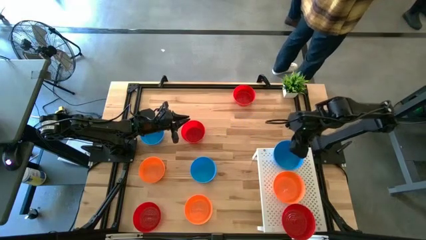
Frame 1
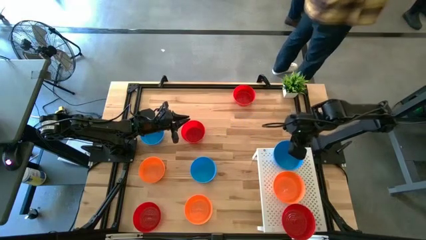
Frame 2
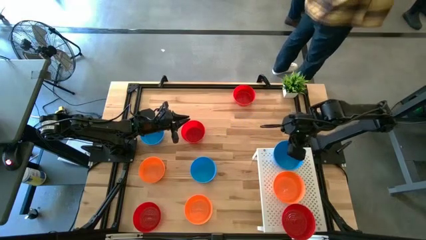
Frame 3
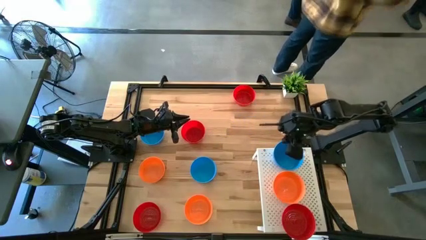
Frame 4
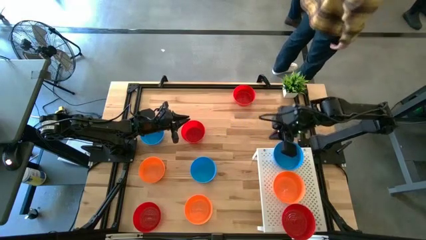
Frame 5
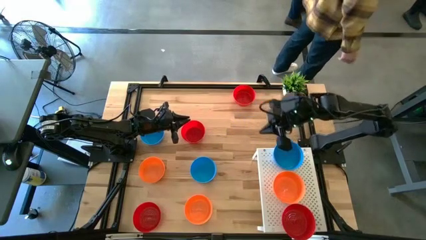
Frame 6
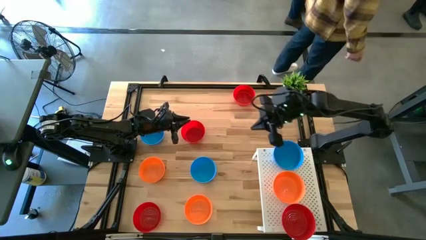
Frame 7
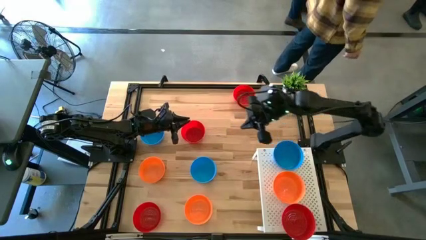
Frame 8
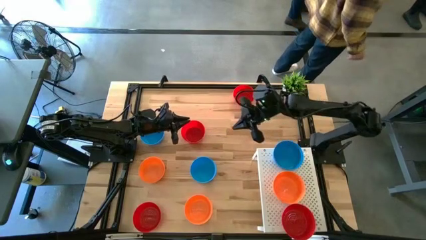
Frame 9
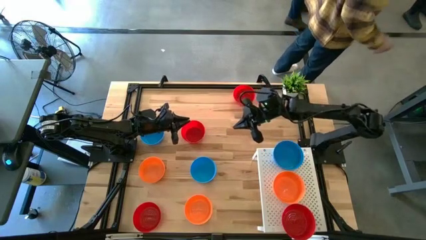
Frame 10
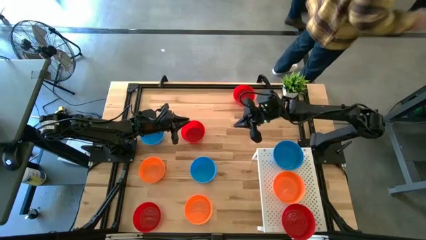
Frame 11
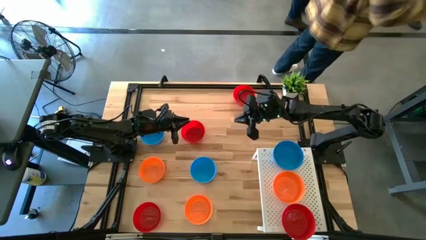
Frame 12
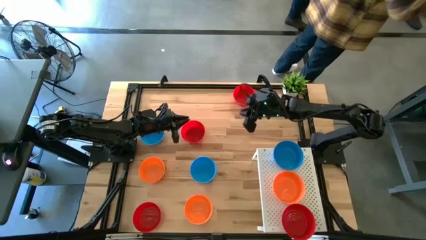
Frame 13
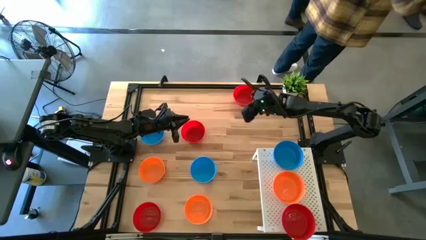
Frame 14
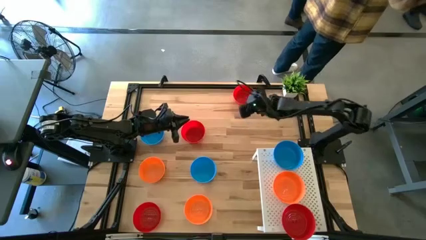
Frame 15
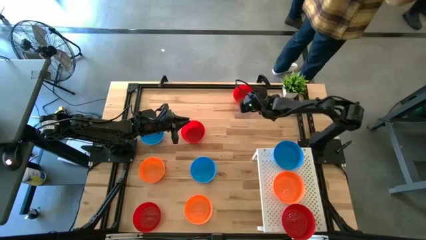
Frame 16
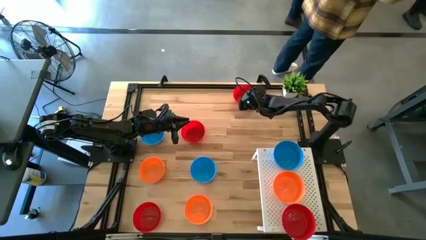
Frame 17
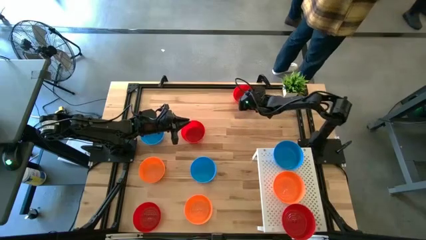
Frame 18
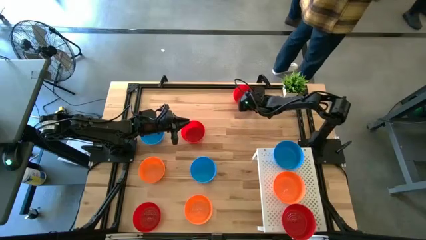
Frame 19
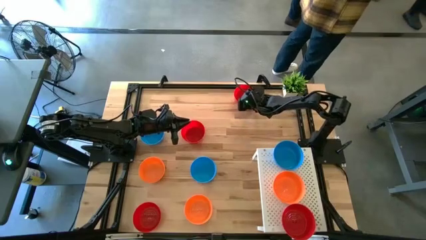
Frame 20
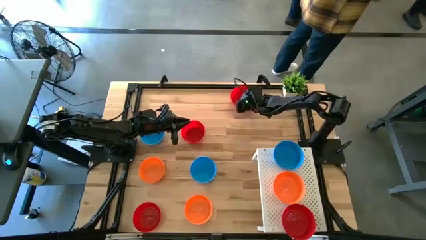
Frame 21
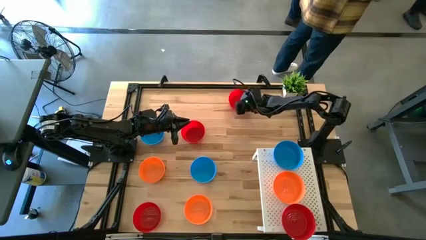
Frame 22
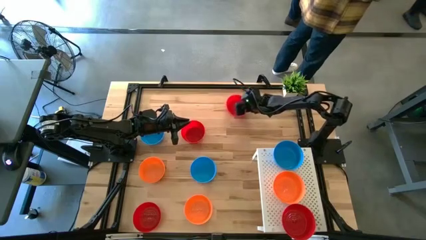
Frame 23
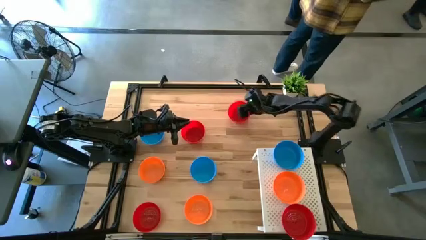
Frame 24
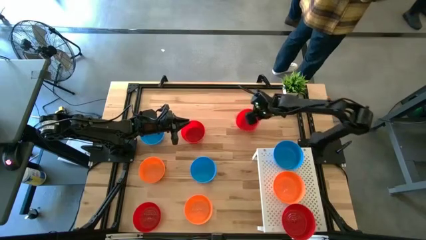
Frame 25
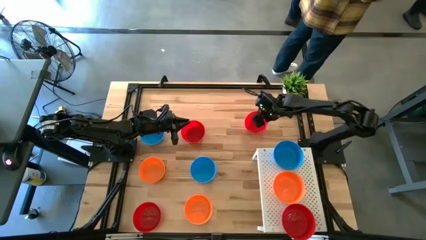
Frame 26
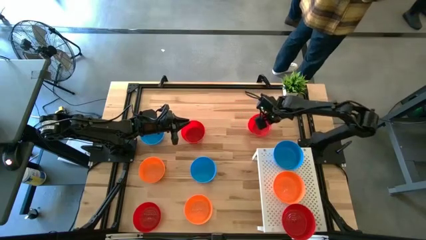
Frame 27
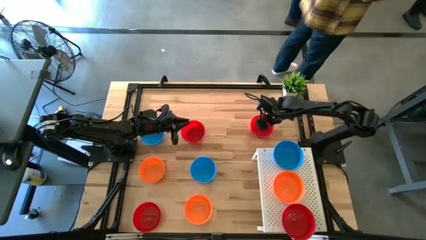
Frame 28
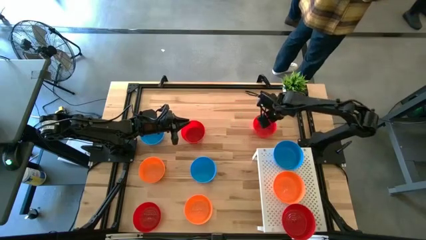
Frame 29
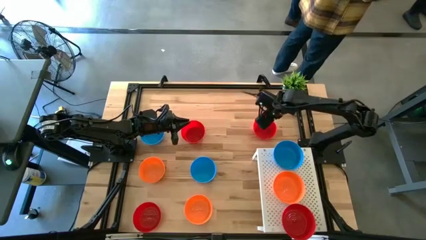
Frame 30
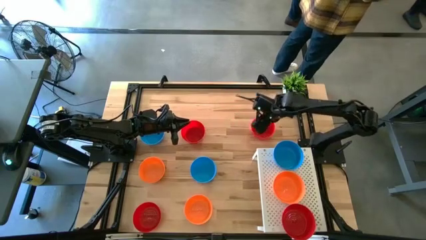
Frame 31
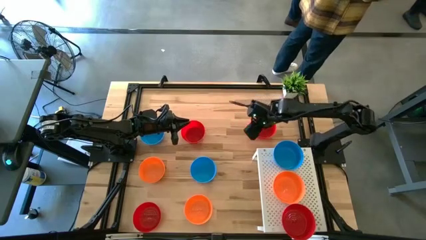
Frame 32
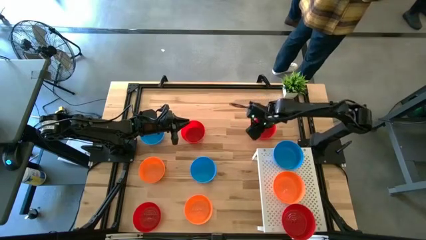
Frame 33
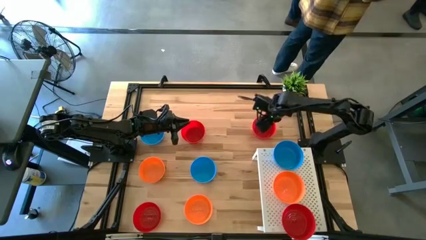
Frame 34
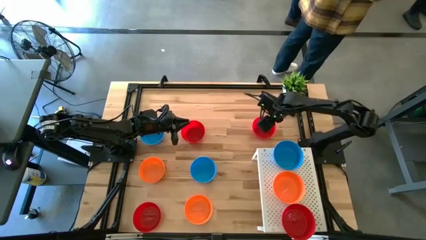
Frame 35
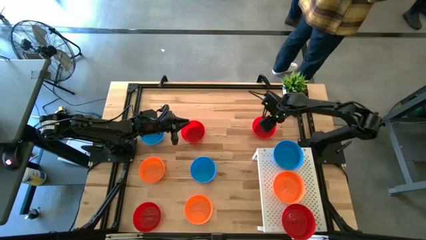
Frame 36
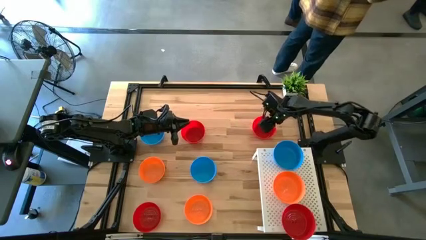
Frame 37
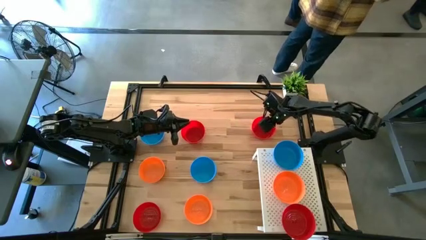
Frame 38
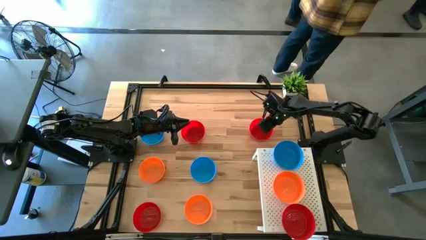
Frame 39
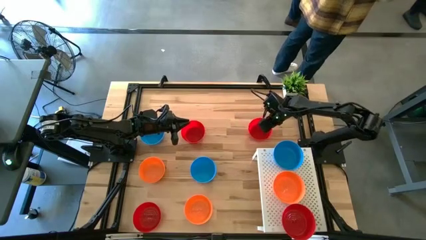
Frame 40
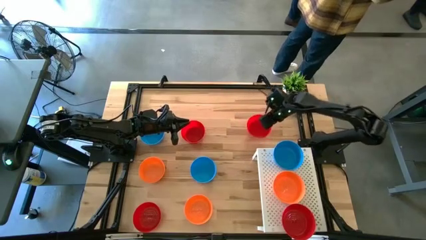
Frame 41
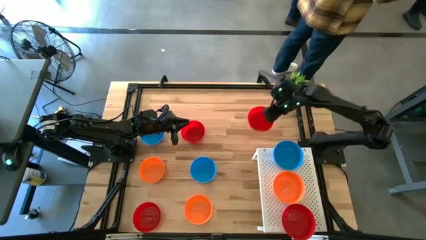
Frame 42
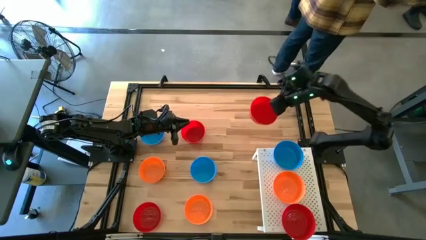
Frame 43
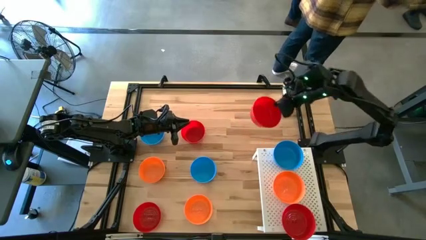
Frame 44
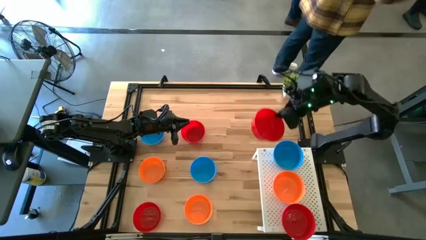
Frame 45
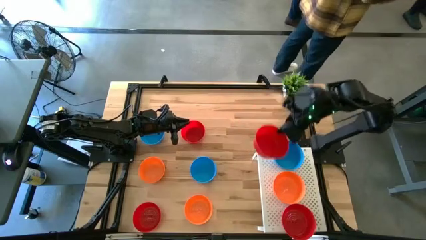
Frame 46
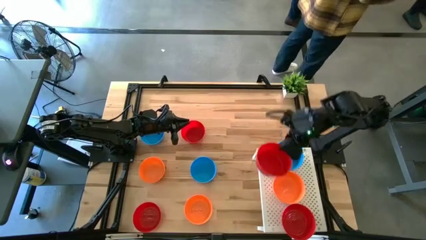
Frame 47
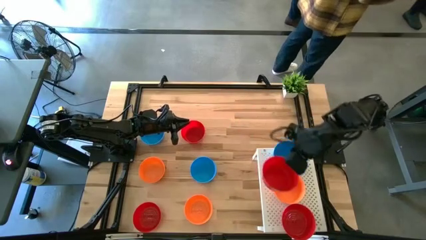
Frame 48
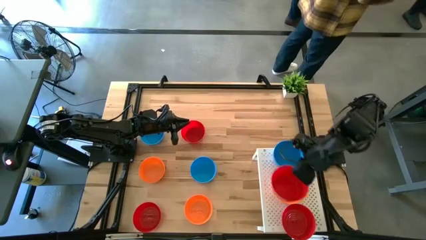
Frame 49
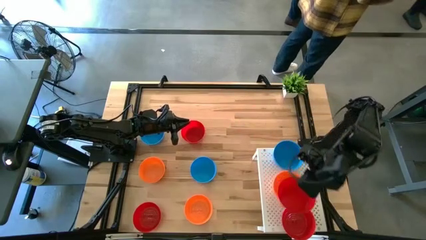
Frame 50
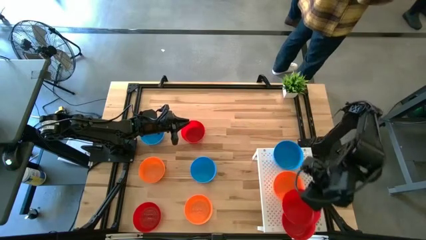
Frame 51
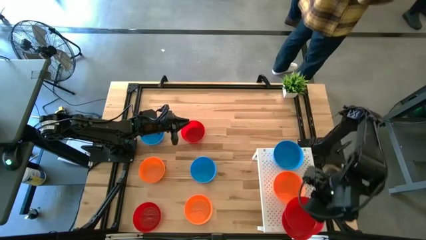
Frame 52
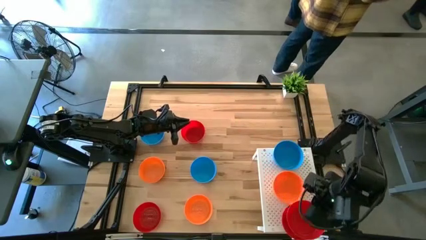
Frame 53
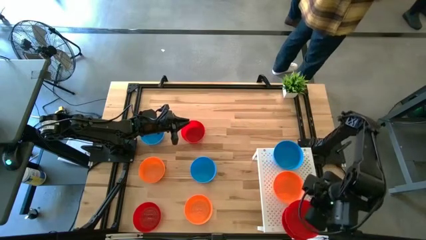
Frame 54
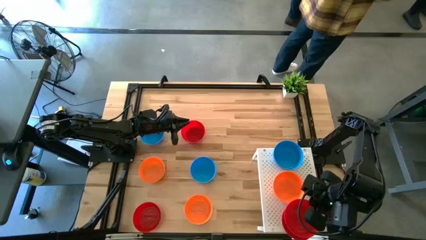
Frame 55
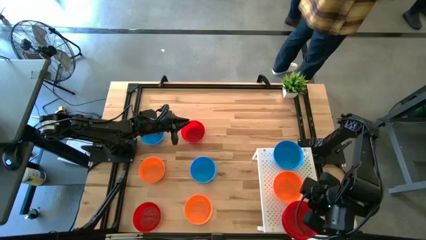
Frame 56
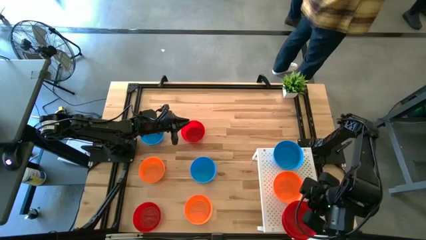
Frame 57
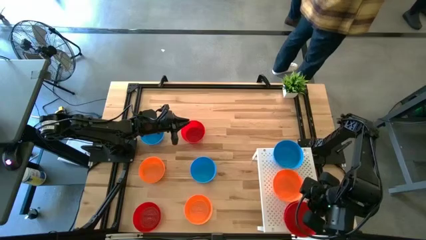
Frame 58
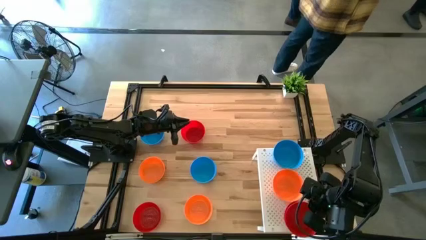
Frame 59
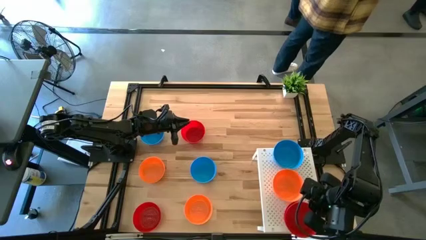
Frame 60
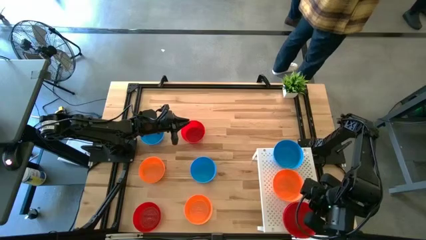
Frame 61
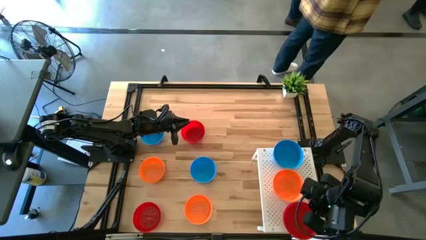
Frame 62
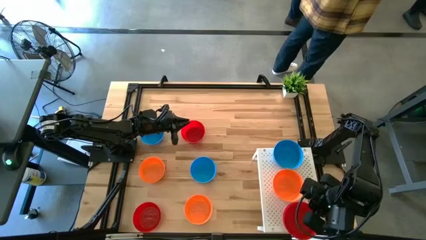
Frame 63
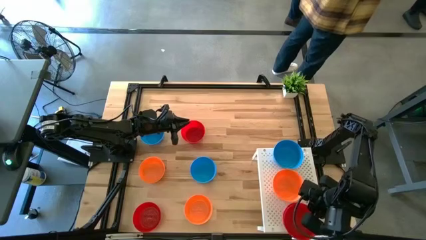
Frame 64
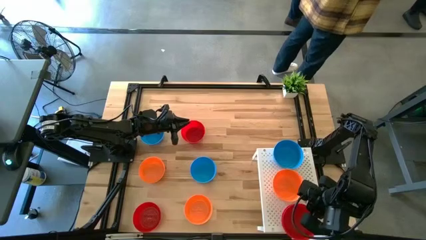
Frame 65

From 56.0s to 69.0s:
Task: Pick & Place Mini bowls
Stack the red bowl on top of the other red bowl on the shelf

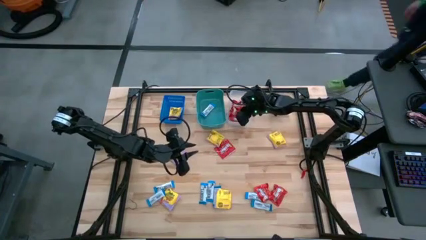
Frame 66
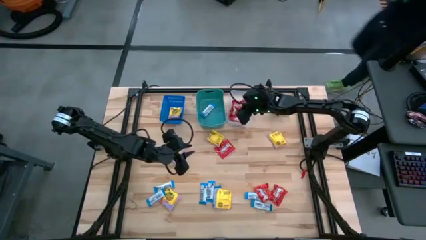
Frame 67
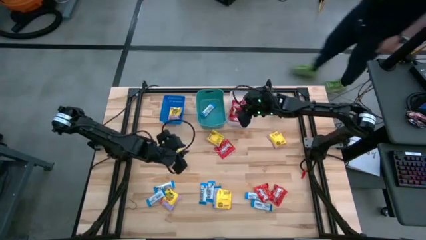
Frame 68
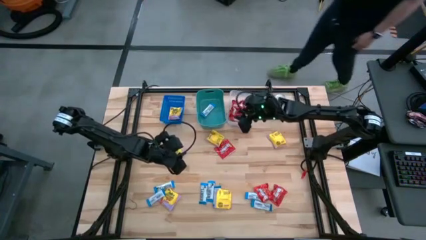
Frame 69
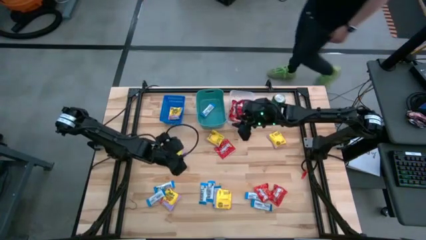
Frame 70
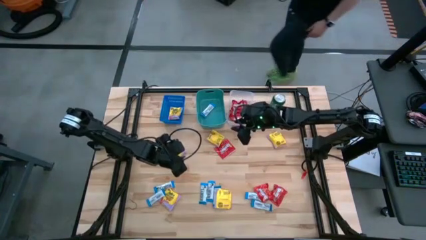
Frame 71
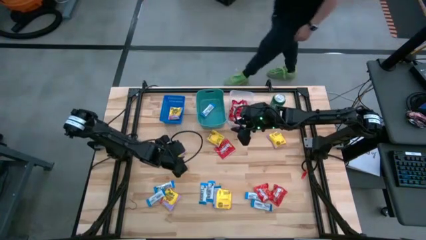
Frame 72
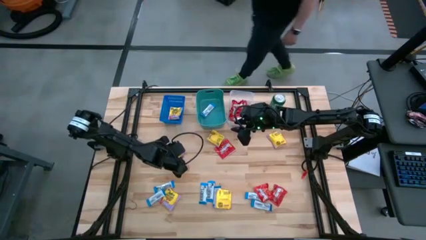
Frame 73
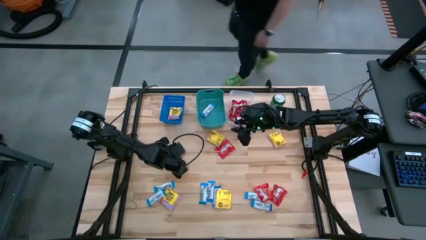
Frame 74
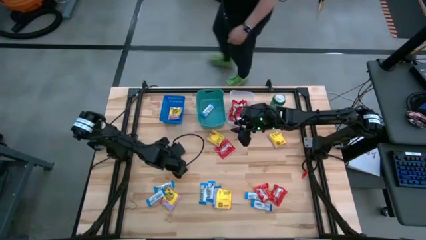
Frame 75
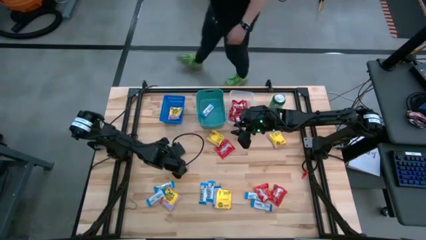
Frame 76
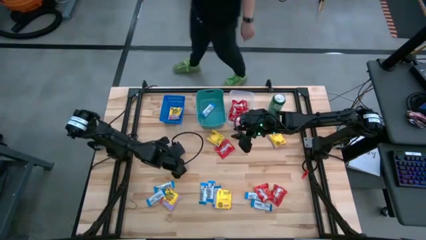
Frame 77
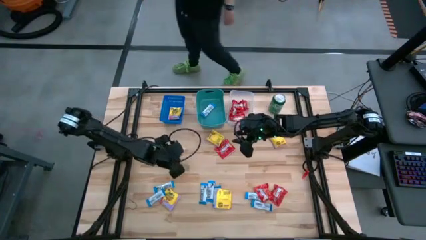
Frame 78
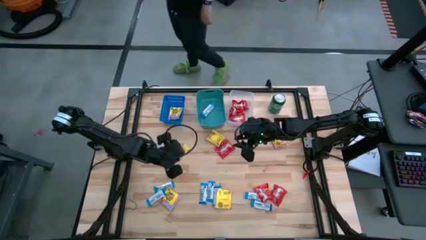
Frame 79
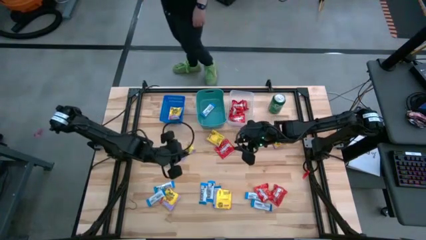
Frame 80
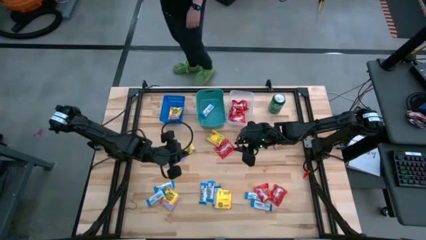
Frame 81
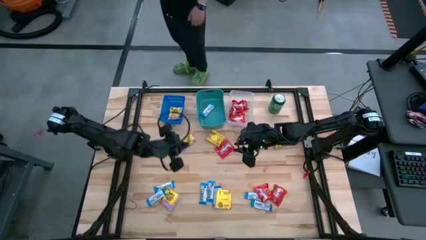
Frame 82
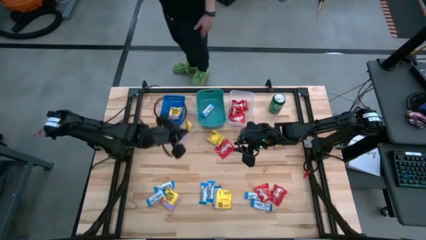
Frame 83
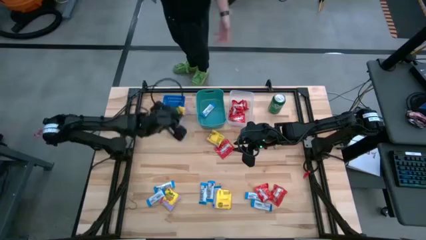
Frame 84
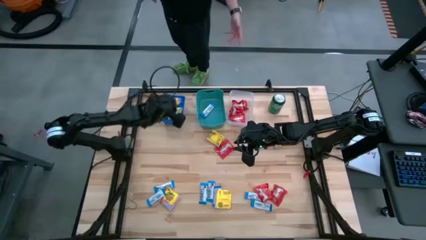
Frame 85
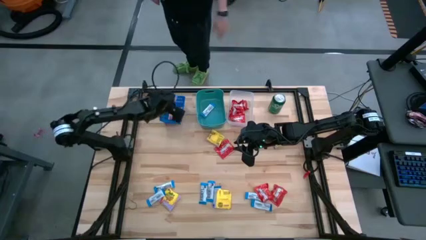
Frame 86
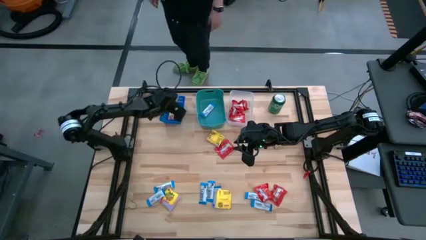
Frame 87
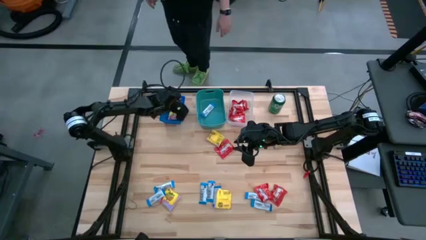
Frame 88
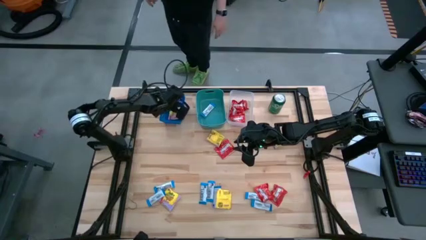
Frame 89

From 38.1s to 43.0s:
Task: Sort candy
Put the yellow candy into the blue bin
